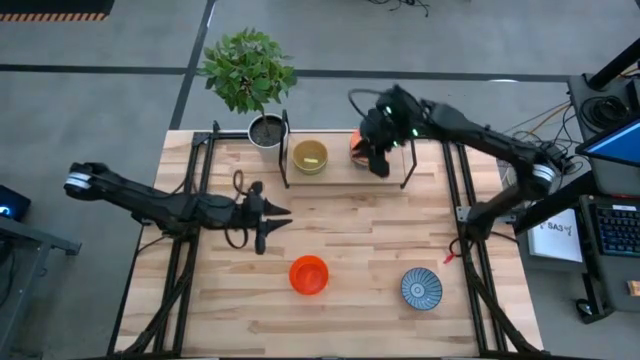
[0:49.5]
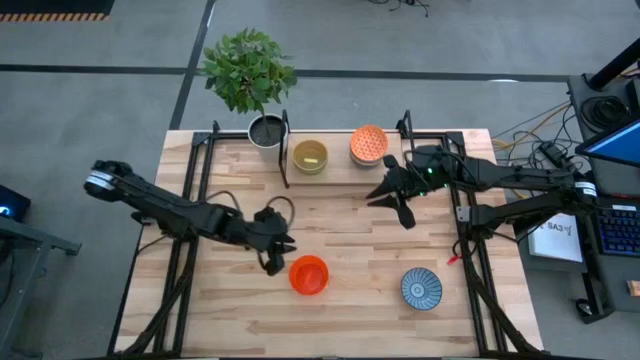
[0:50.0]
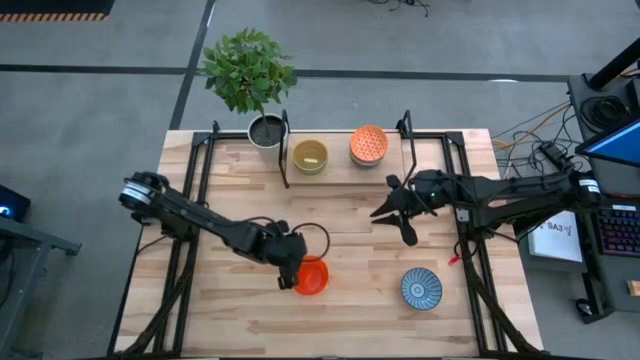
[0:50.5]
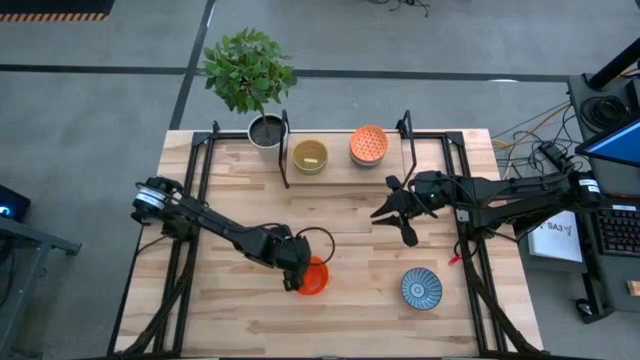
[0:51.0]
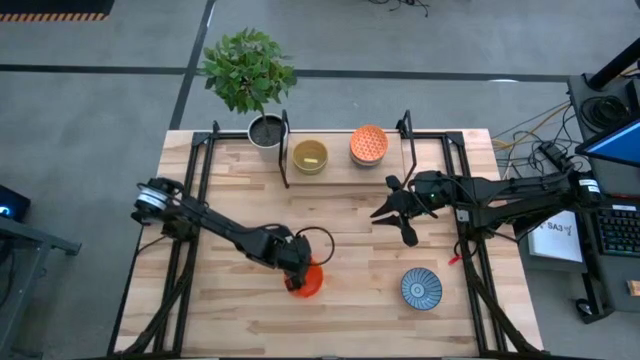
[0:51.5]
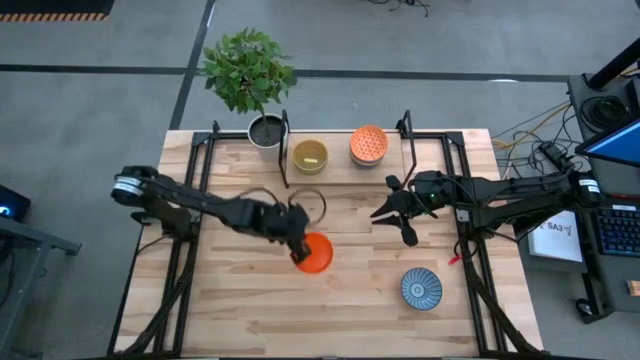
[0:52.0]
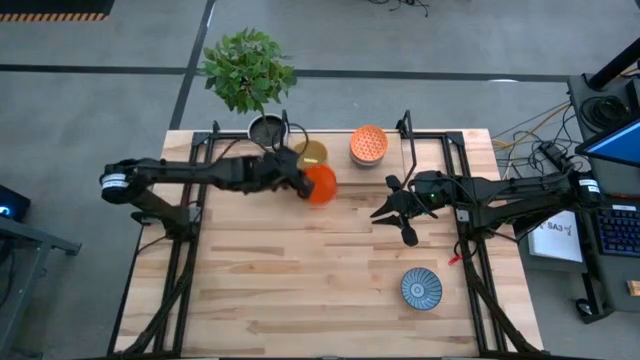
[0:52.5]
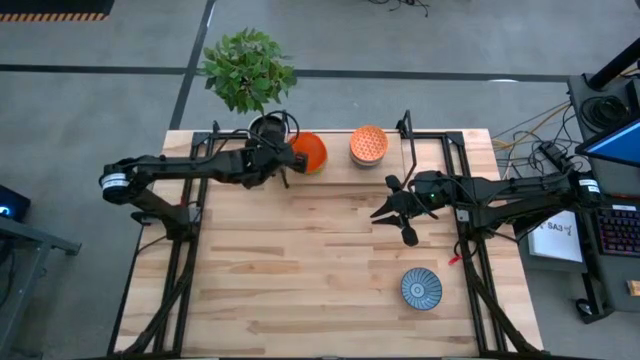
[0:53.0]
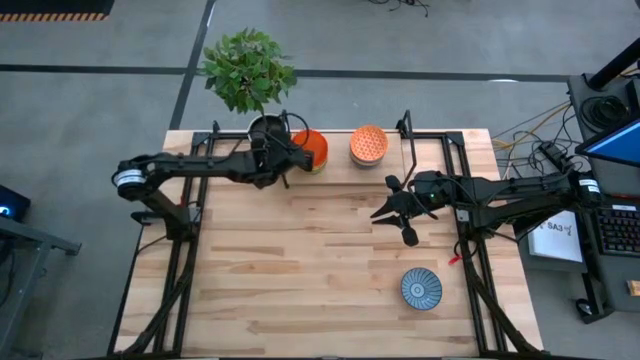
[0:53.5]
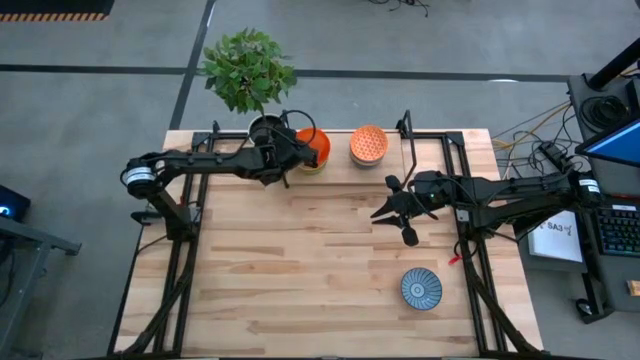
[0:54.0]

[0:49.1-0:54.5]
Task: Place and stack bowls onto a shelf
Stack the orange transparent bowl on top of the yellow transparent bowl on the shelf

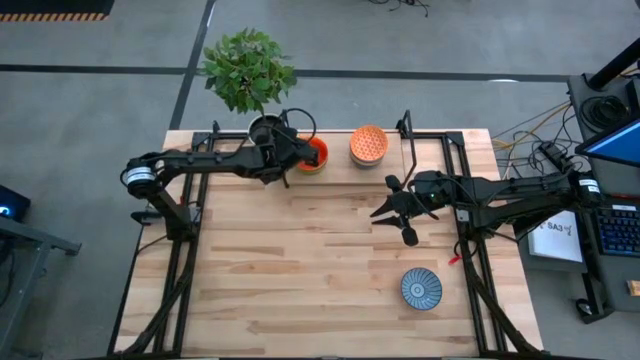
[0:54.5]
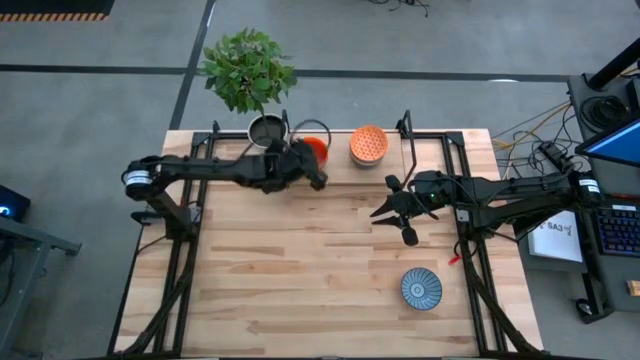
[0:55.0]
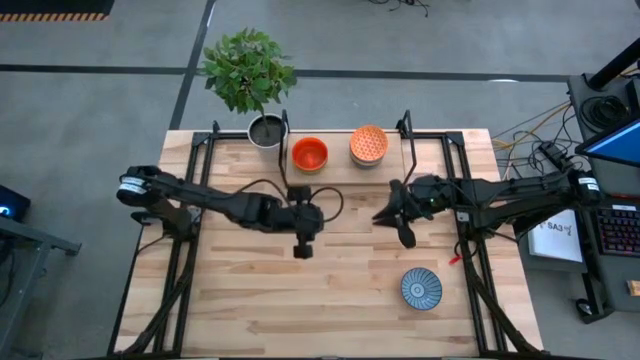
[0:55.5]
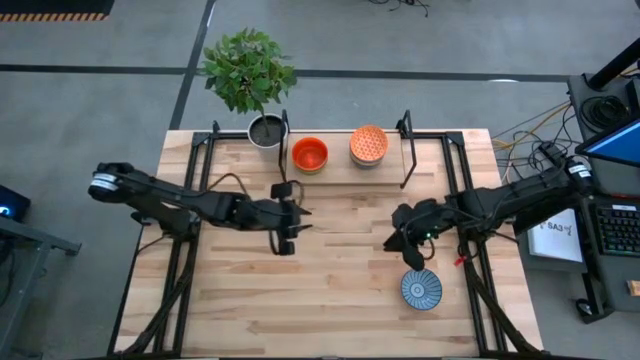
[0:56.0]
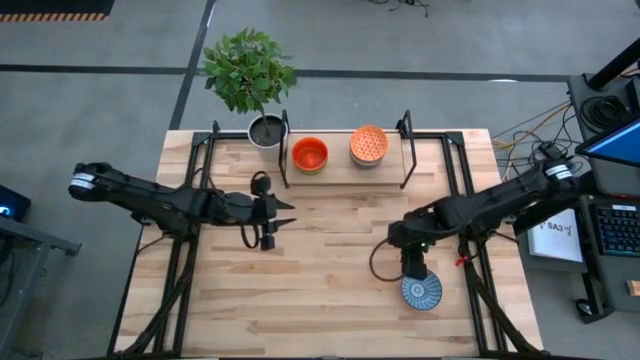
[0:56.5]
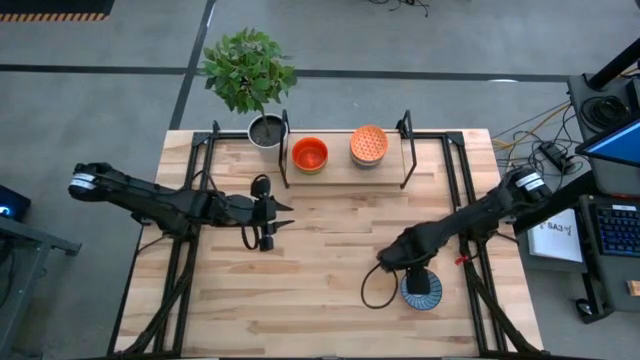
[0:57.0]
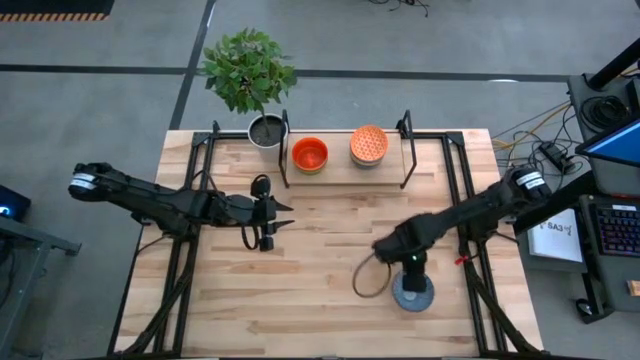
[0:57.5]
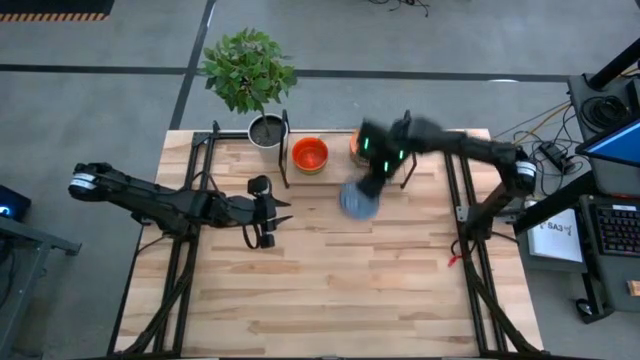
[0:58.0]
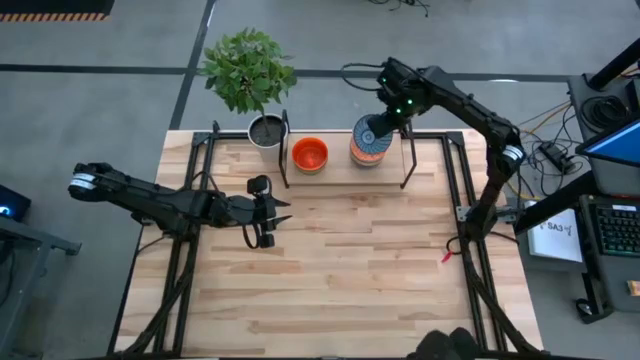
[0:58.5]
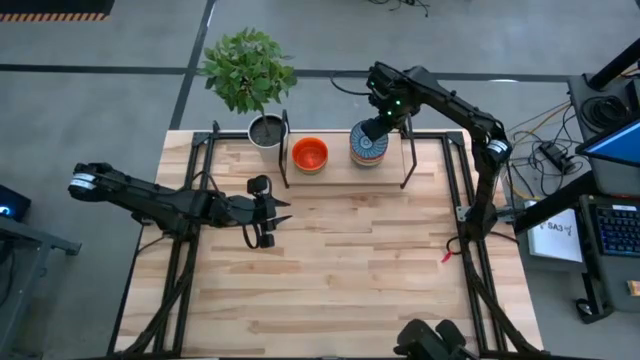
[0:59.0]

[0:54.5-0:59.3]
Stack the blue bowl on top of the orange bowl on the shelf

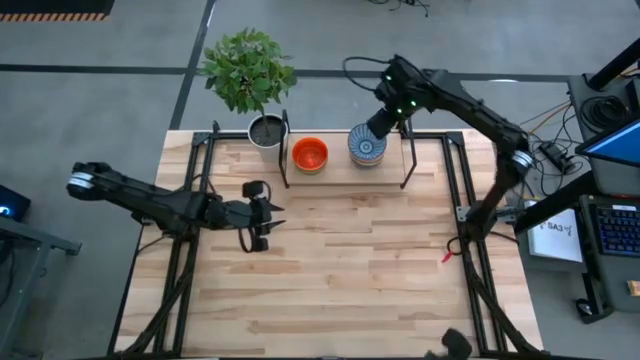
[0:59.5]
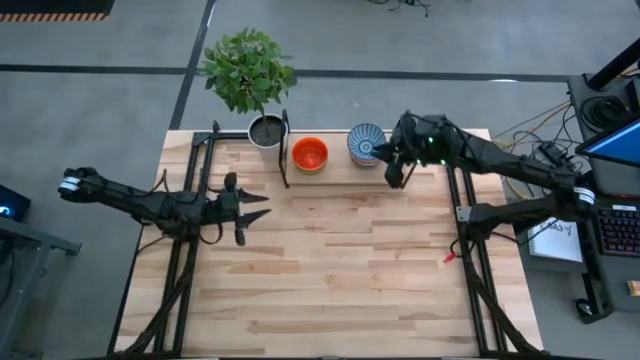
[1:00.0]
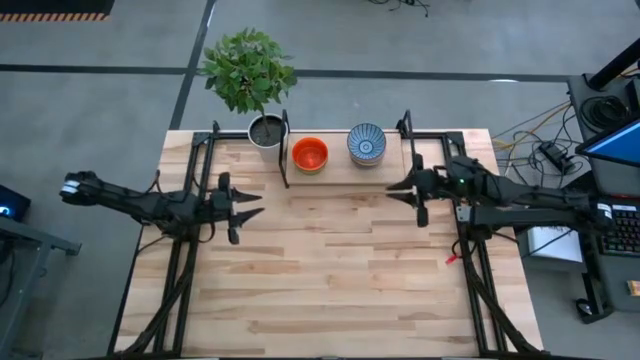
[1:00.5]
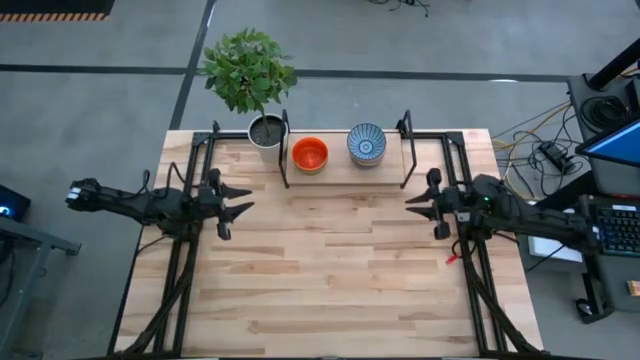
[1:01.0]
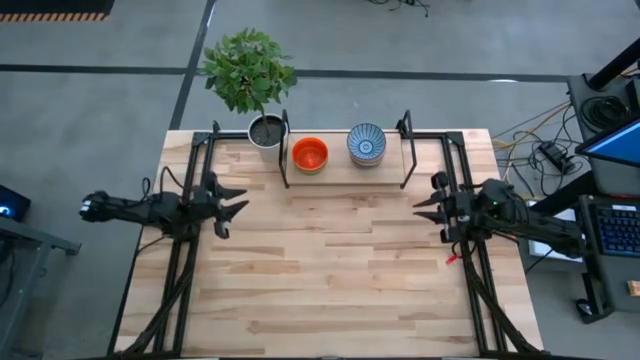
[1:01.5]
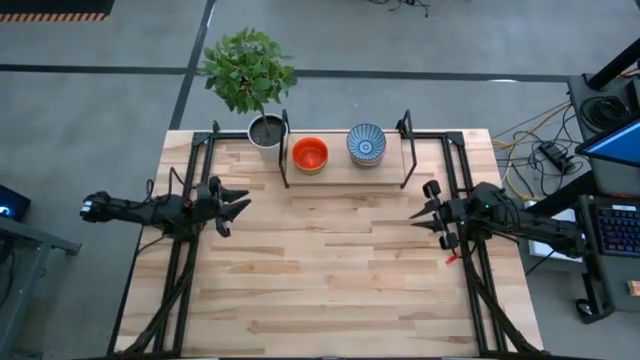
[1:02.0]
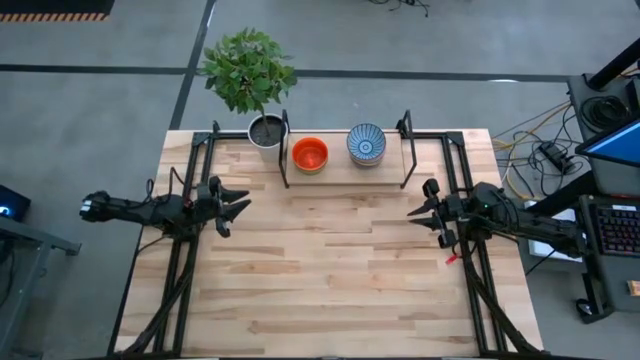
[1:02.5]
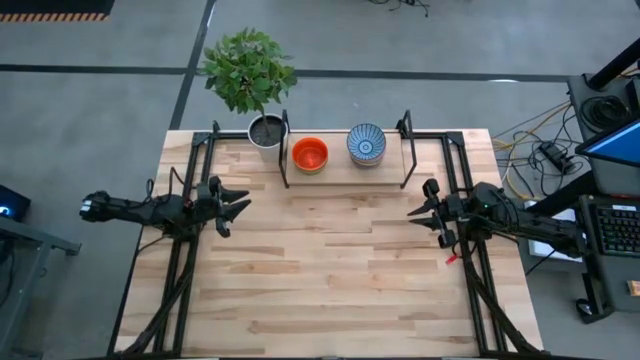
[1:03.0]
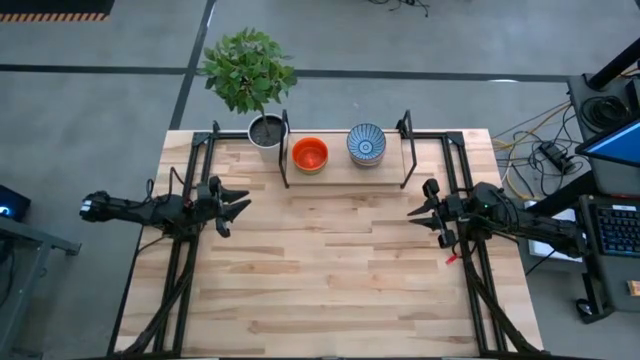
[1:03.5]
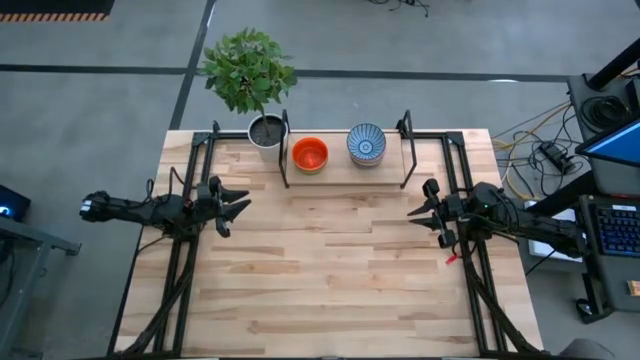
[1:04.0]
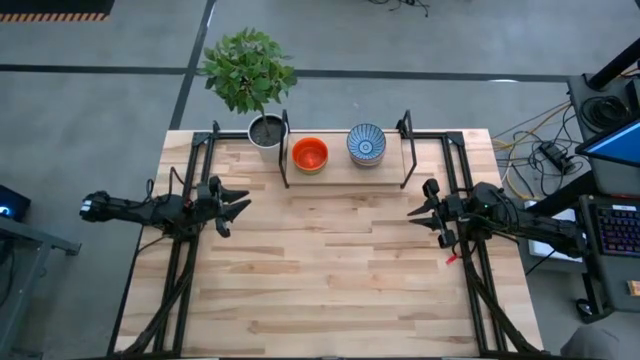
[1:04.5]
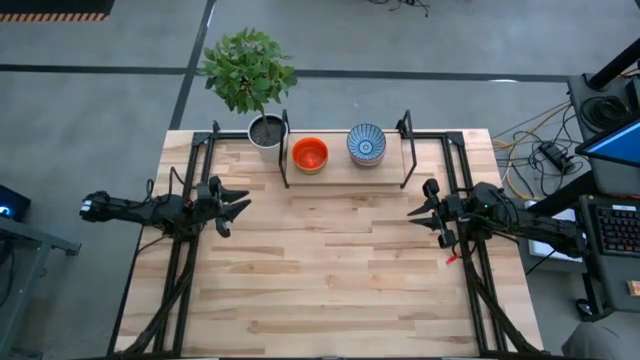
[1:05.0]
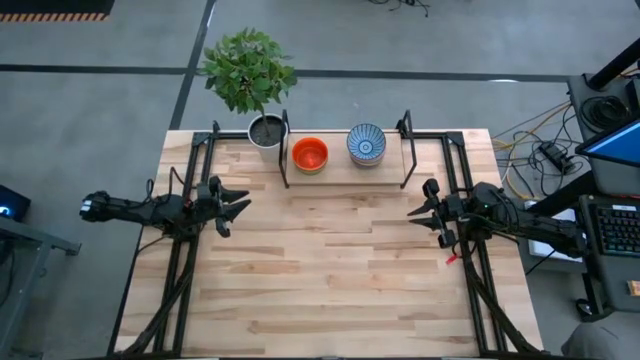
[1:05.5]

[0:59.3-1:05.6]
Return to Home Position

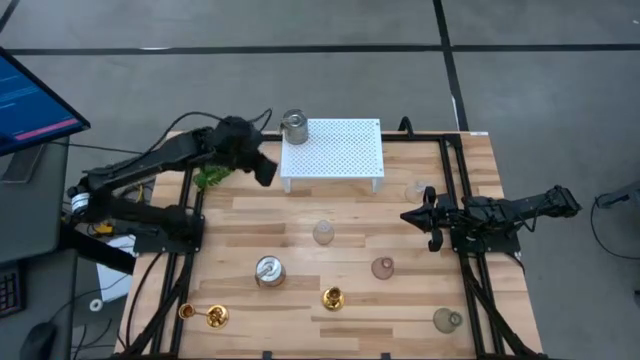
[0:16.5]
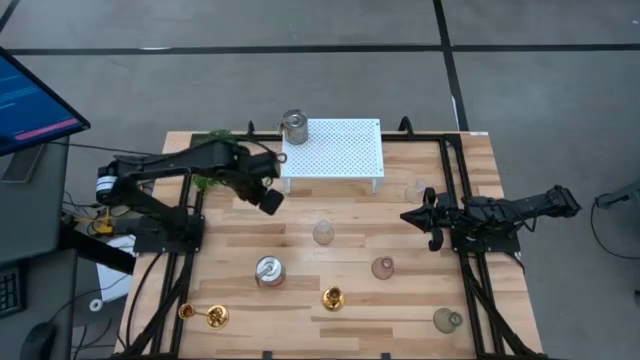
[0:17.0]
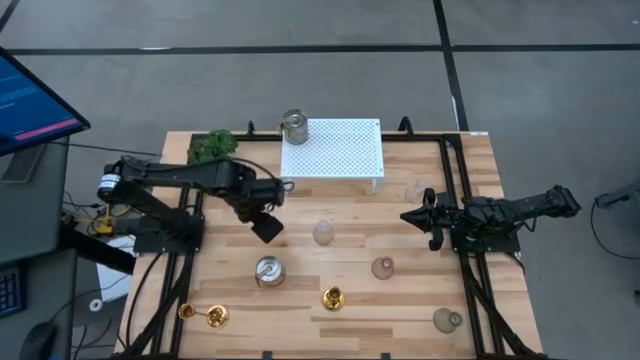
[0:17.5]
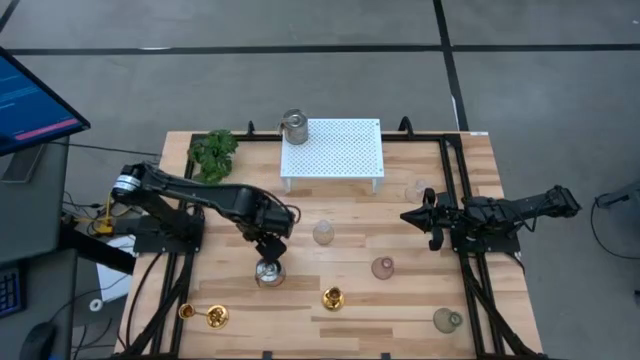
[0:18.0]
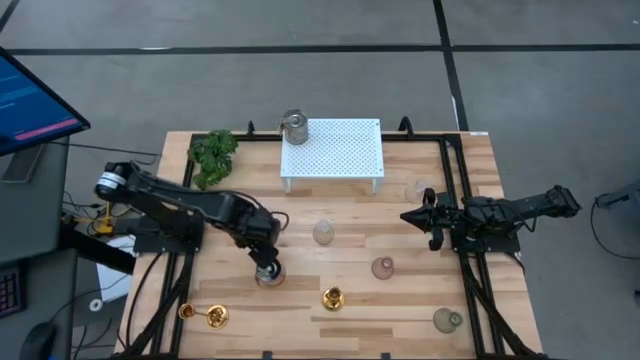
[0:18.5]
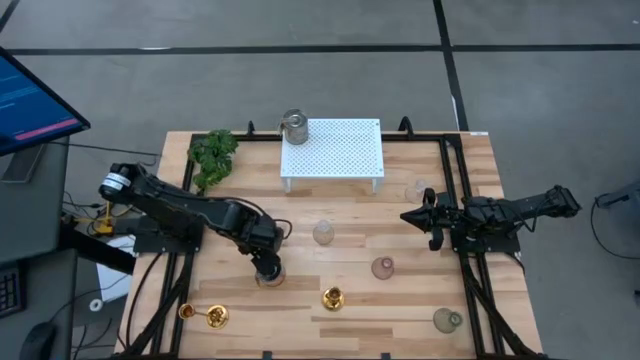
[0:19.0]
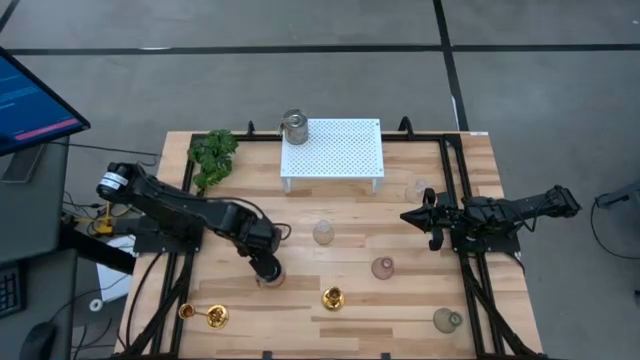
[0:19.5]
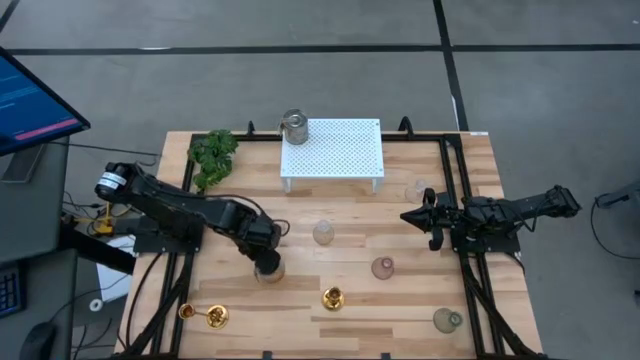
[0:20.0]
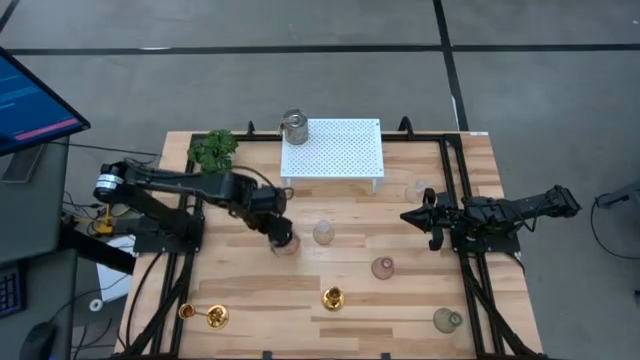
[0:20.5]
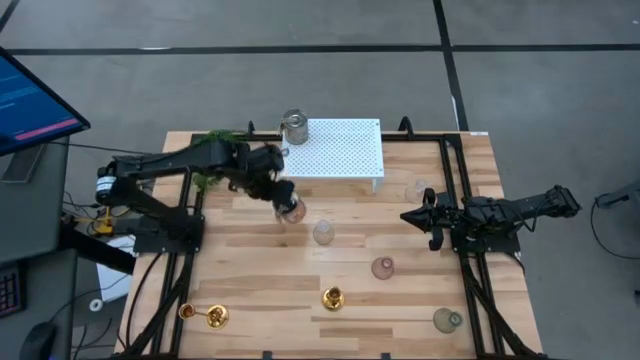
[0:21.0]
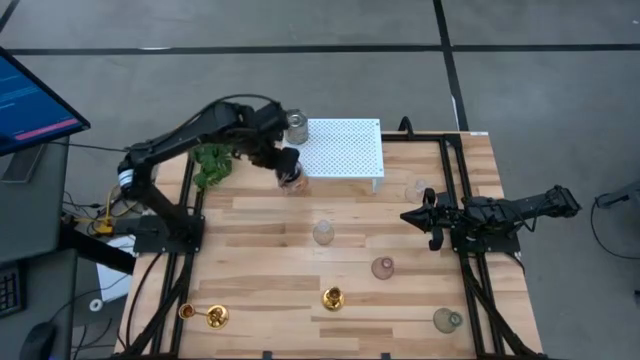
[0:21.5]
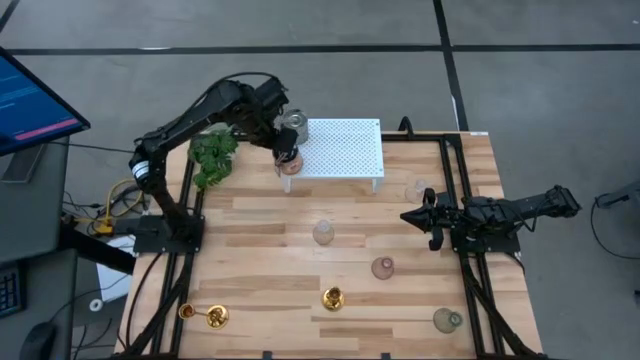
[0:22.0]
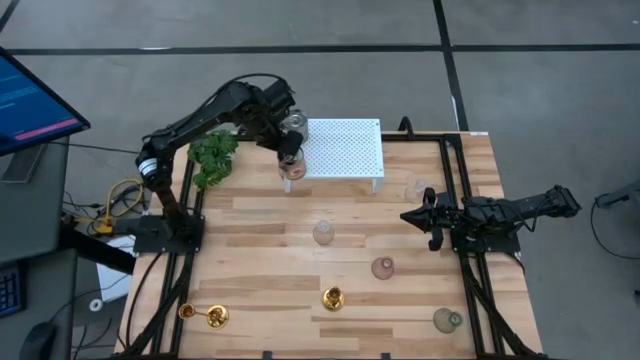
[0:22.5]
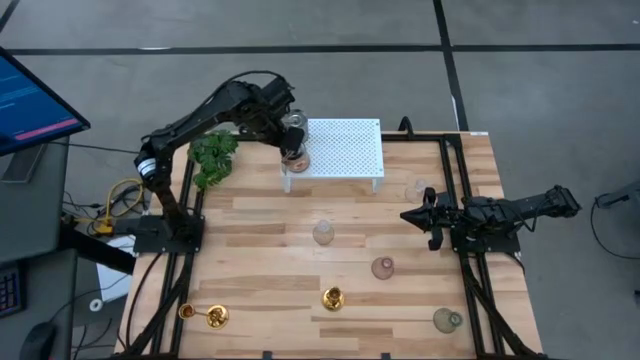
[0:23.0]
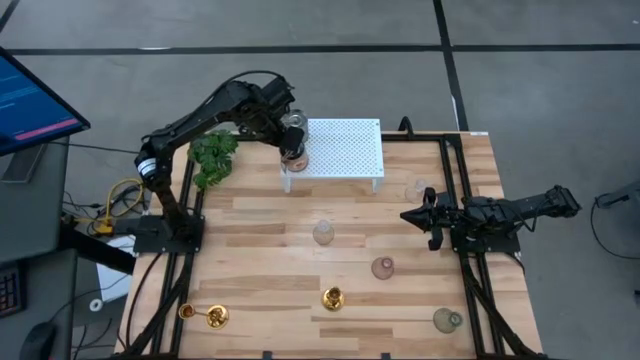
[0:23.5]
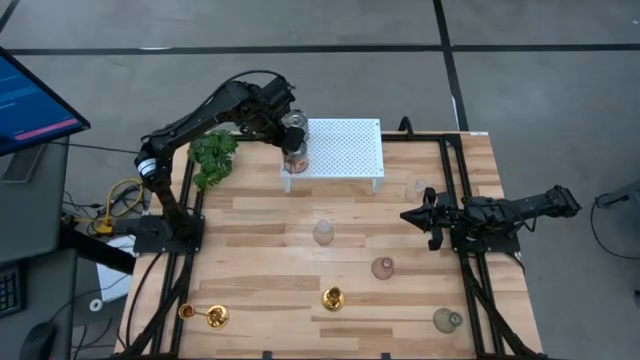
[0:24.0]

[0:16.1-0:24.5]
Task: Pick & Place candle stick holders
Put the silver scented candle on the shelf
